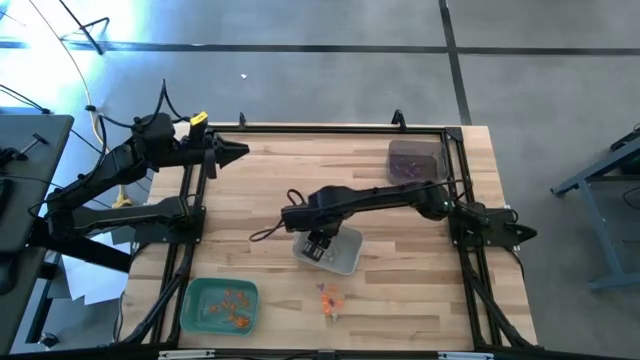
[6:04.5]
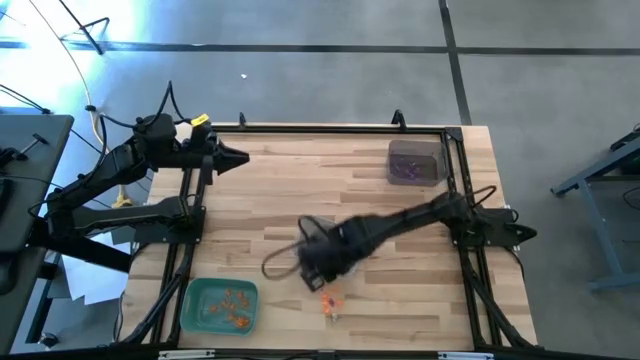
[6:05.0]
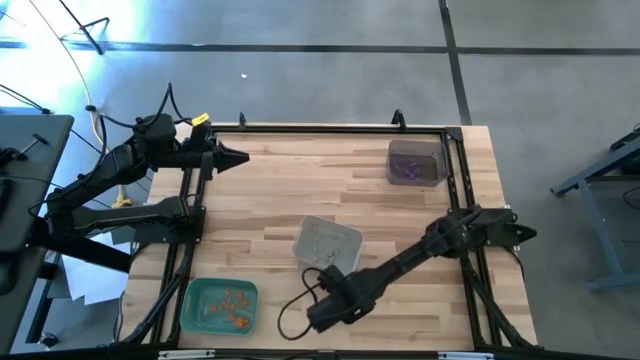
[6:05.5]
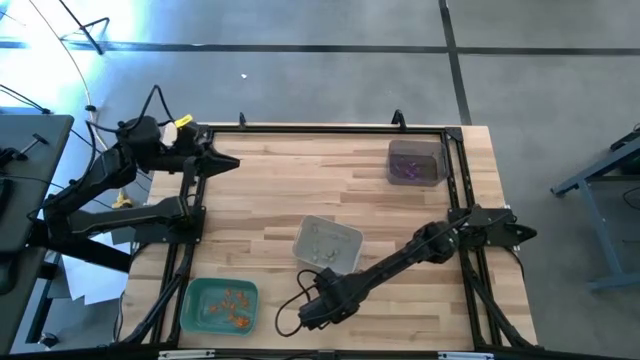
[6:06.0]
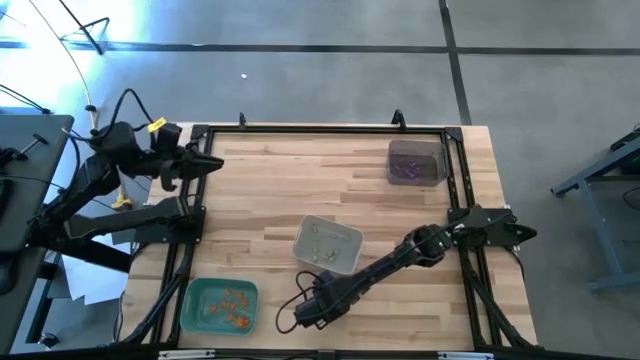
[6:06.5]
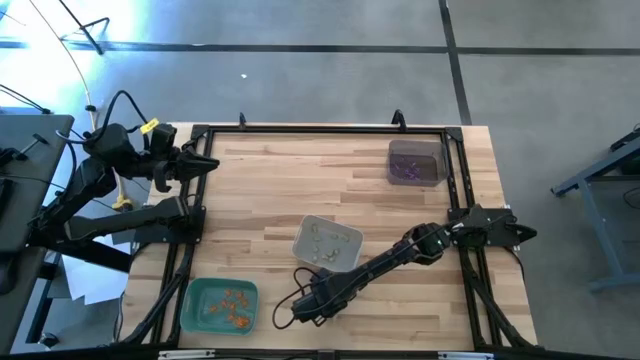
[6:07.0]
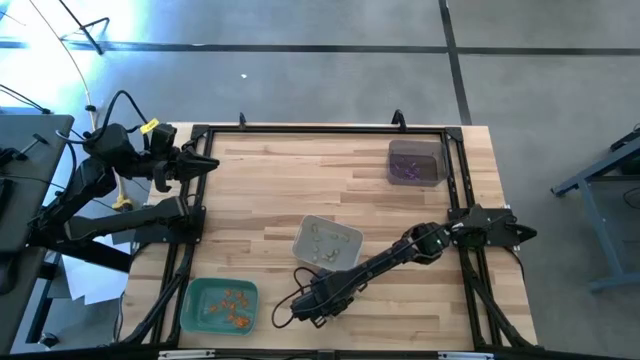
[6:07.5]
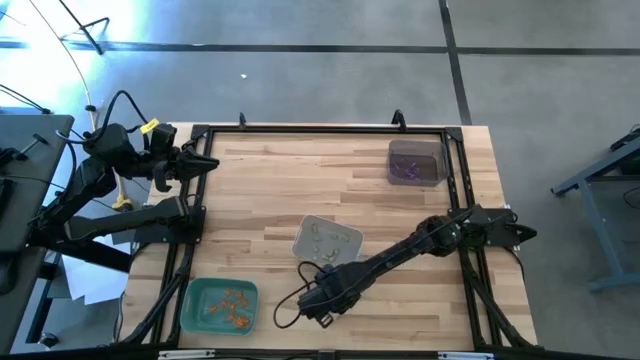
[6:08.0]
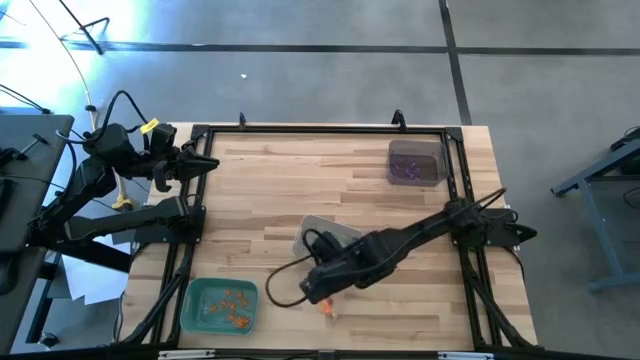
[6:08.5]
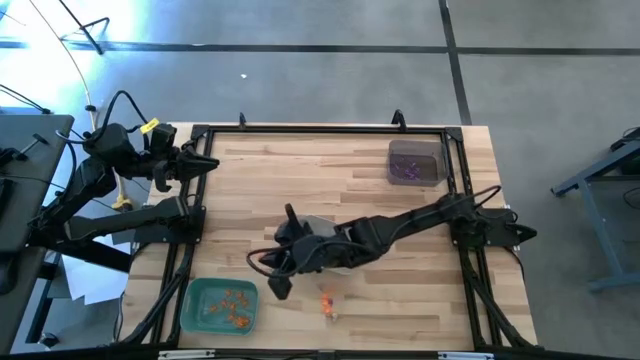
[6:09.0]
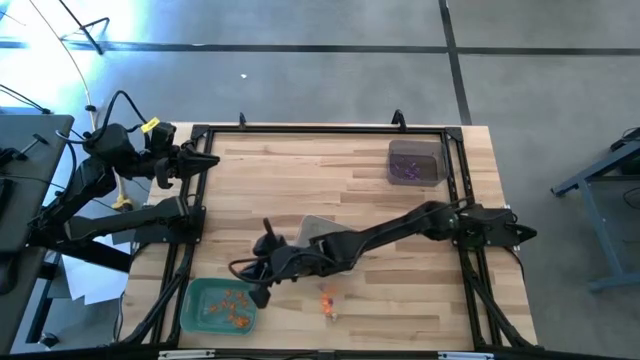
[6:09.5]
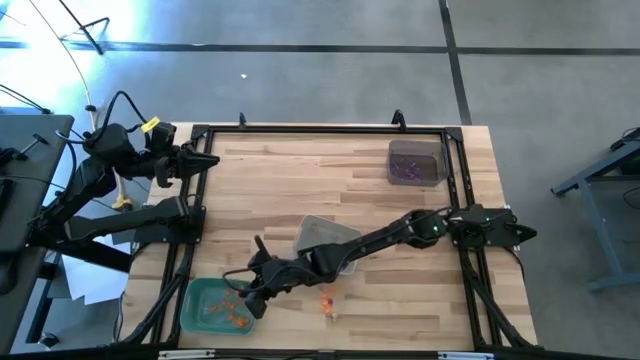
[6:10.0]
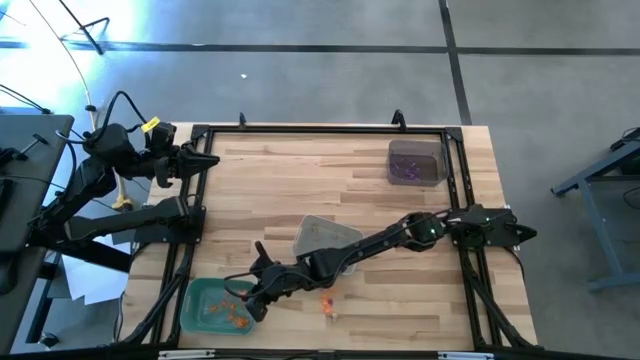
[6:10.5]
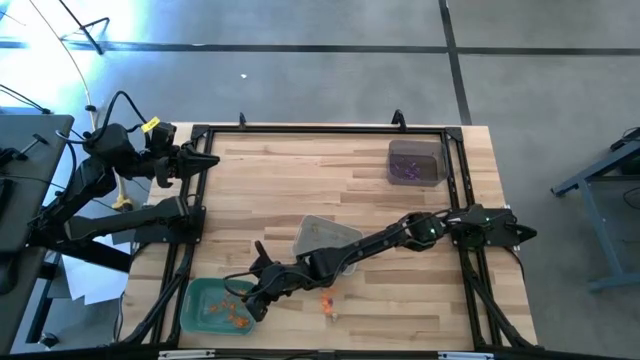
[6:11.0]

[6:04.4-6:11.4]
Task: Sort Halloween decoration
Put the orange spider toy into the green bin

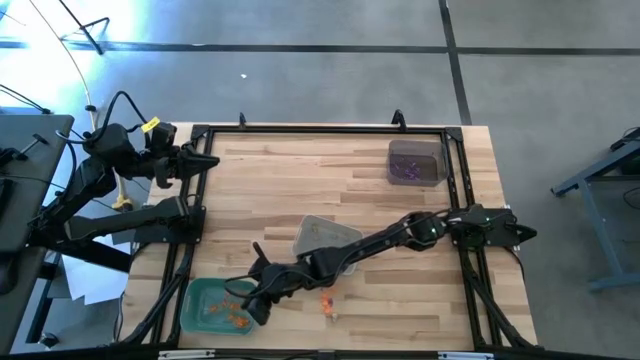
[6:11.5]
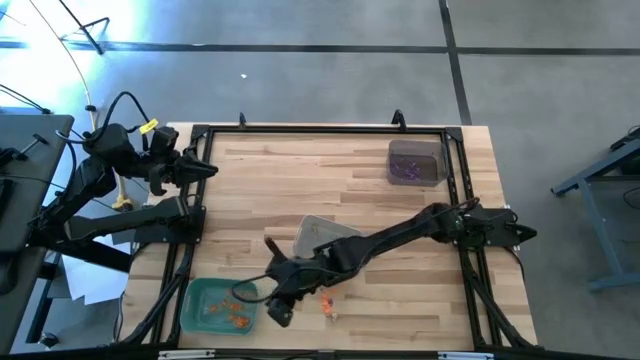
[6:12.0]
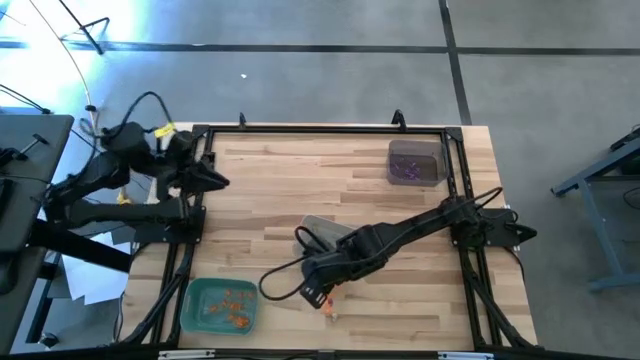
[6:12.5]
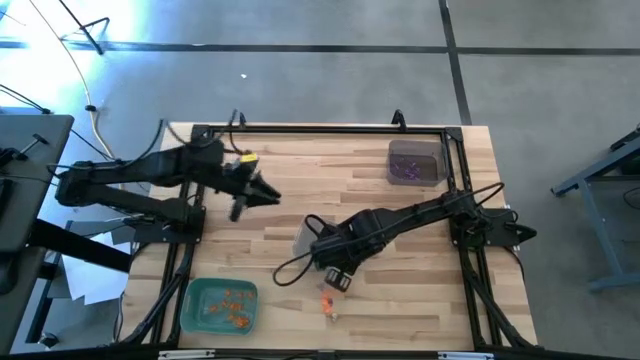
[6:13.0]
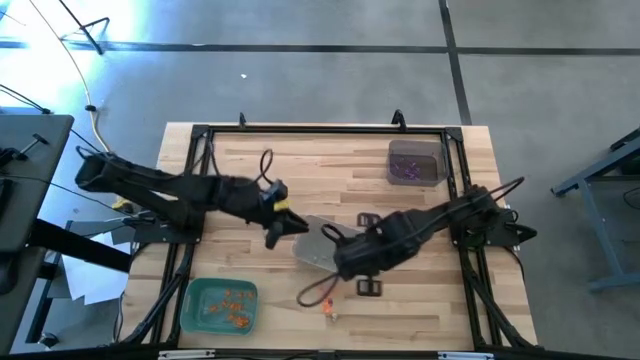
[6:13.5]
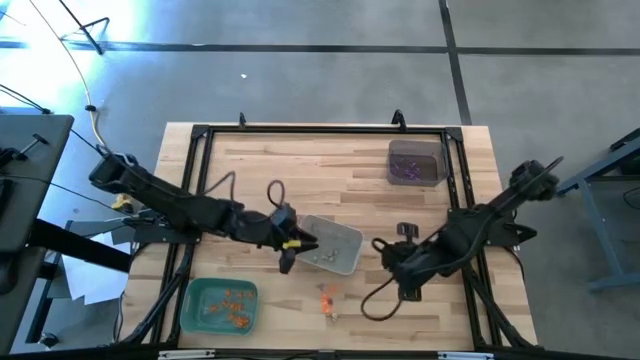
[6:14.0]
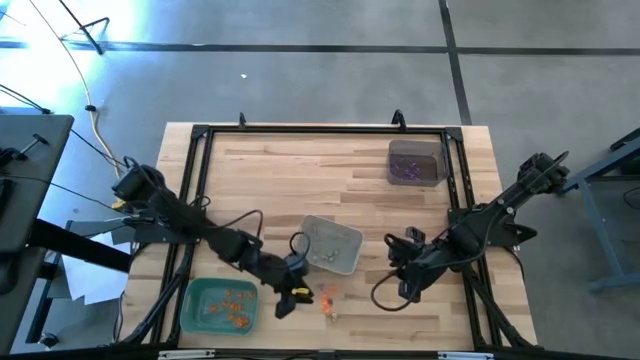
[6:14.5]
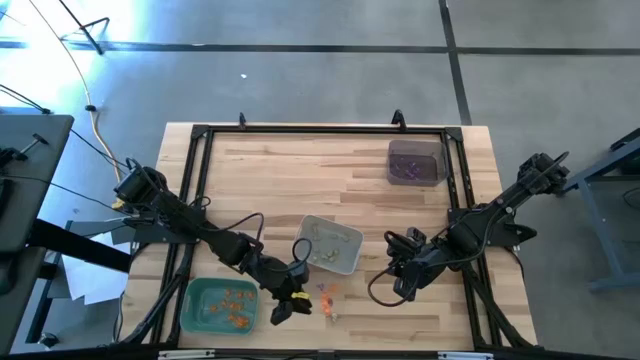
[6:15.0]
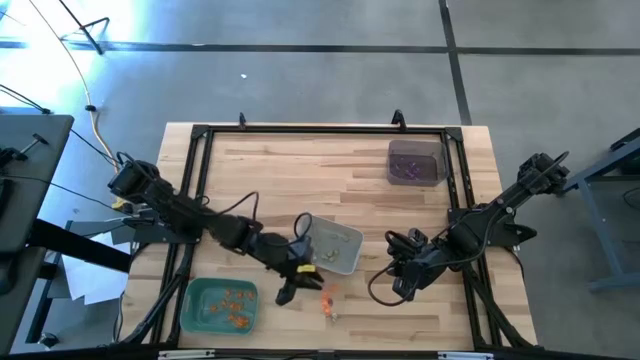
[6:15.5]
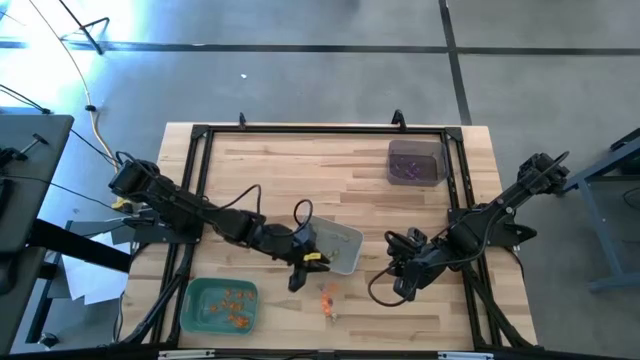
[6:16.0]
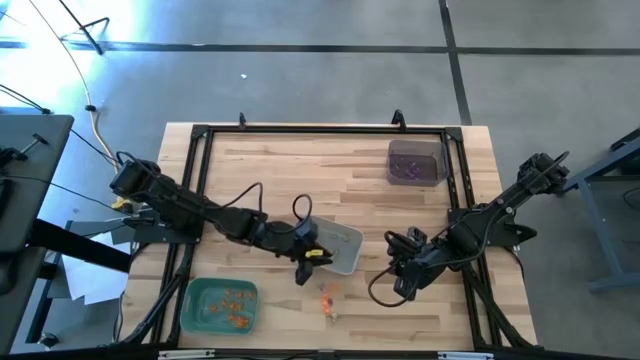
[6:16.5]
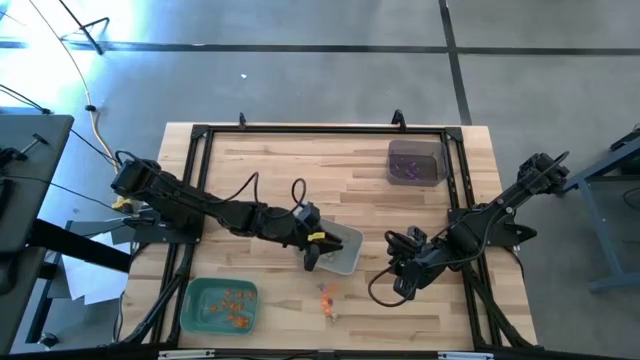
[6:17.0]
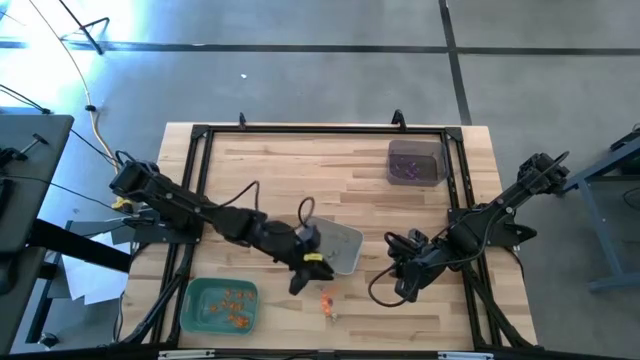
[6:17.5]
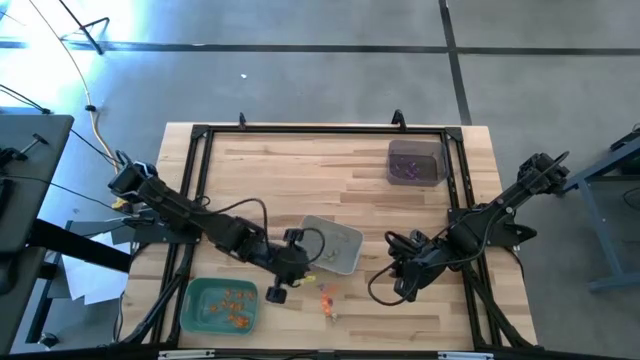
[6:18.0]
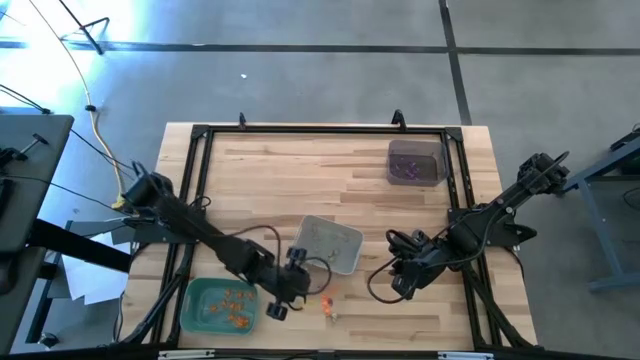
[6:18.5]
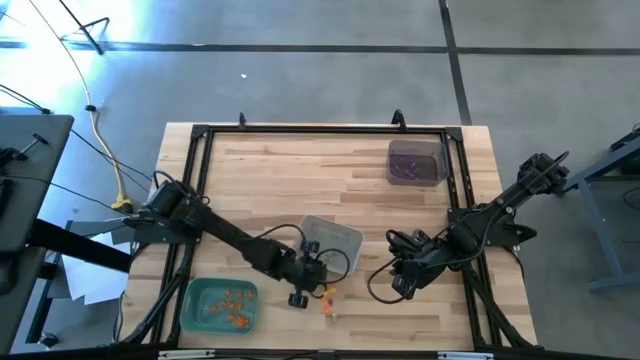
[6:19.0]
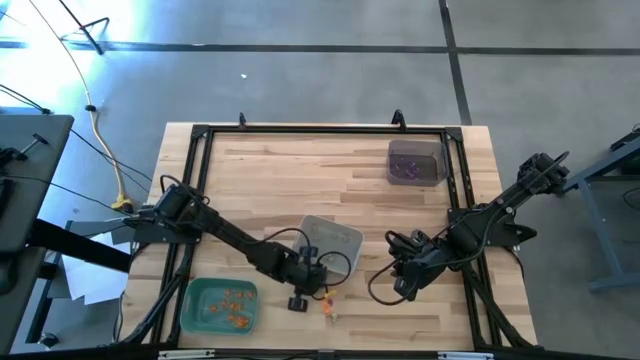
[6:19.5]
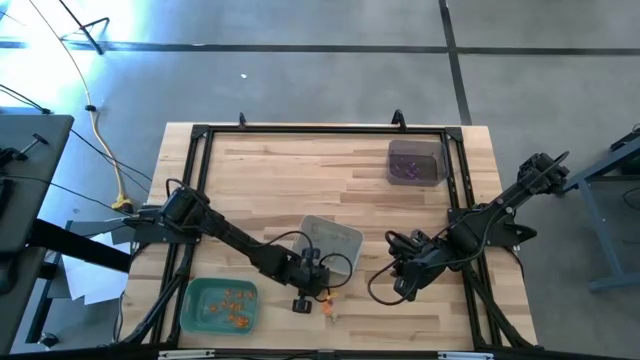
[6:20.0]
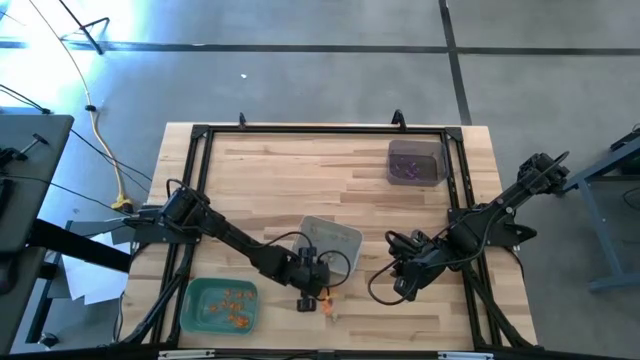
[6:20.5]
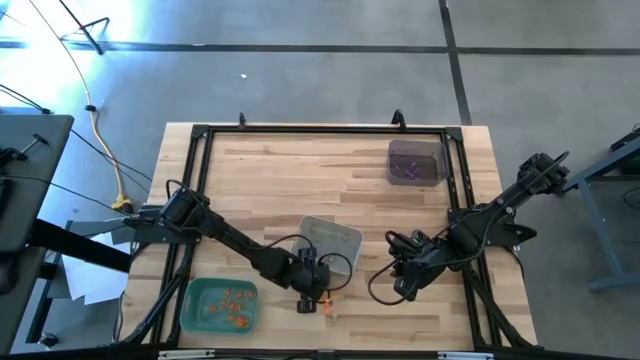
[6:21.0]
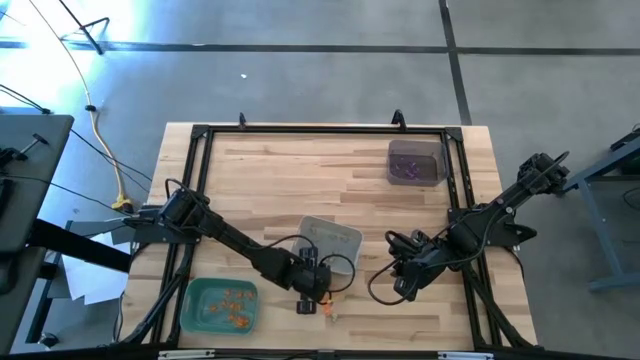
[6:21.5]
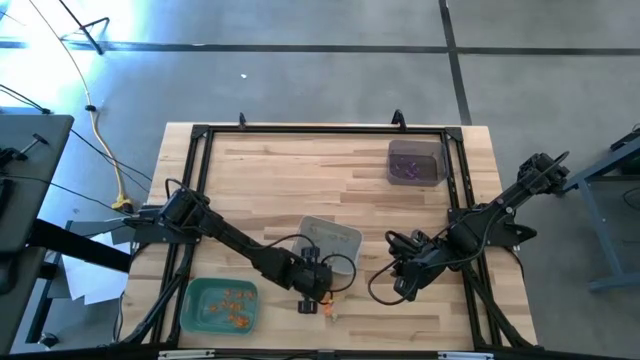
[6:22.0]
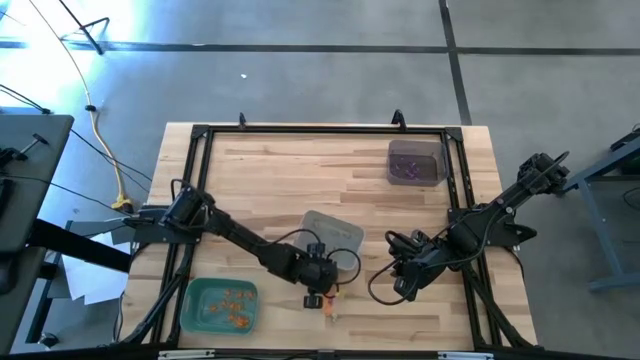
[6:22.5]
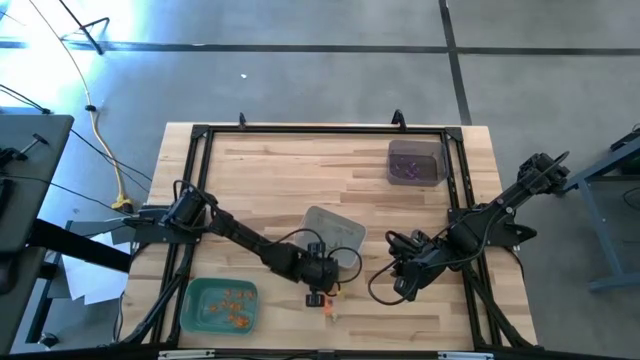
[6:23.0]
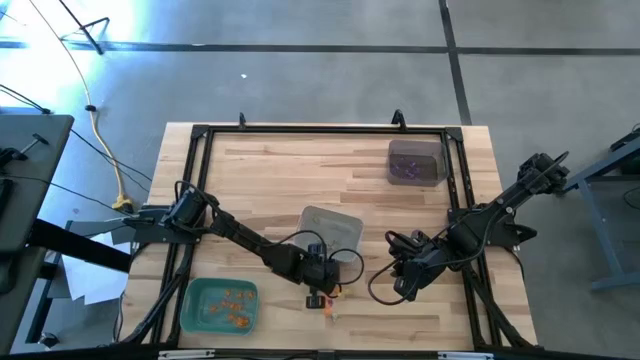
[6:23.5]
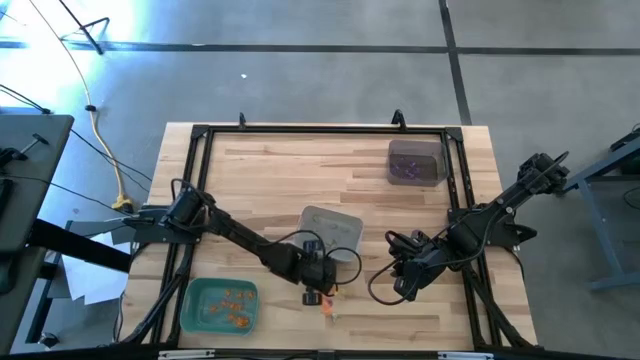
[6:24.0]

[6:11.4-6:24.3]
Put the violet witch hat toy into the black bin

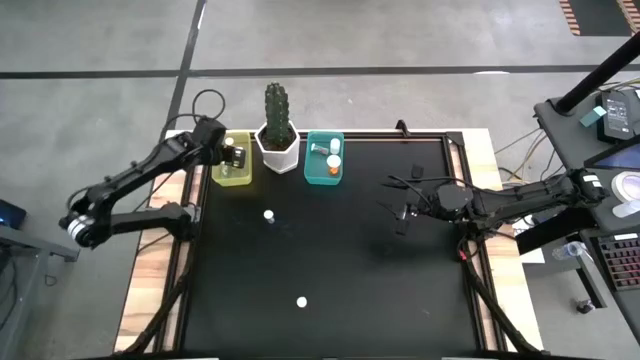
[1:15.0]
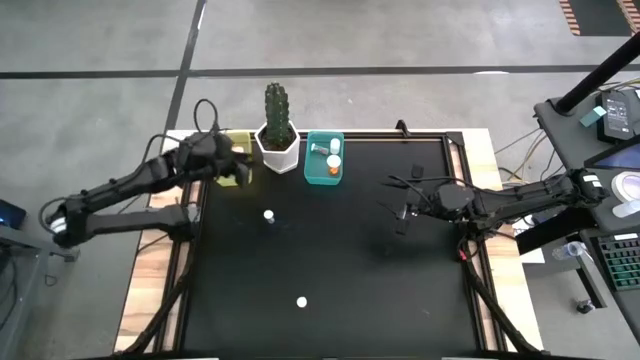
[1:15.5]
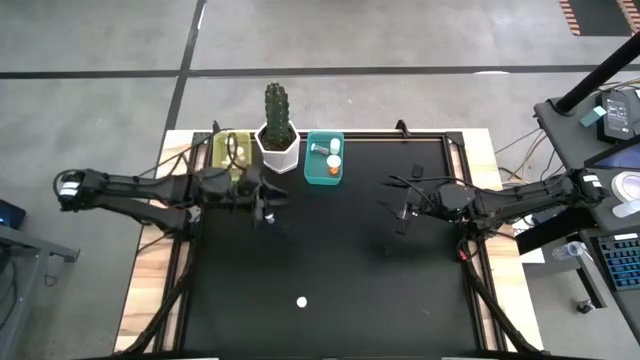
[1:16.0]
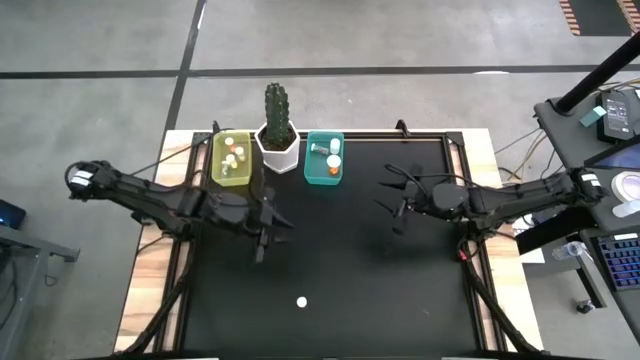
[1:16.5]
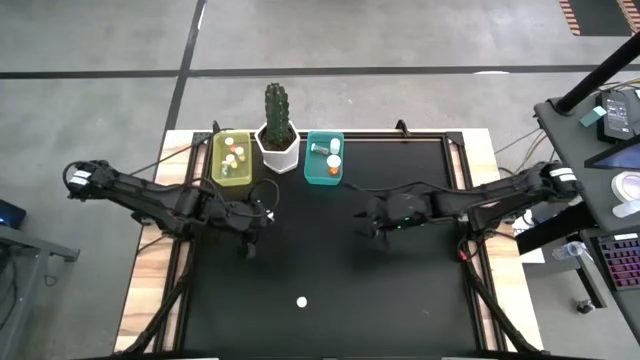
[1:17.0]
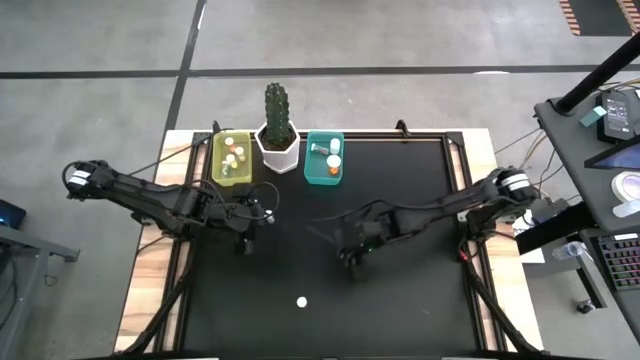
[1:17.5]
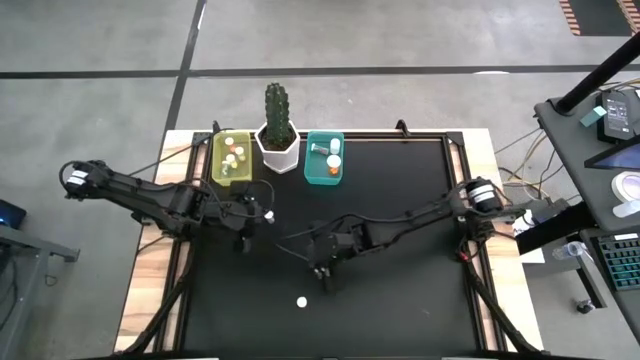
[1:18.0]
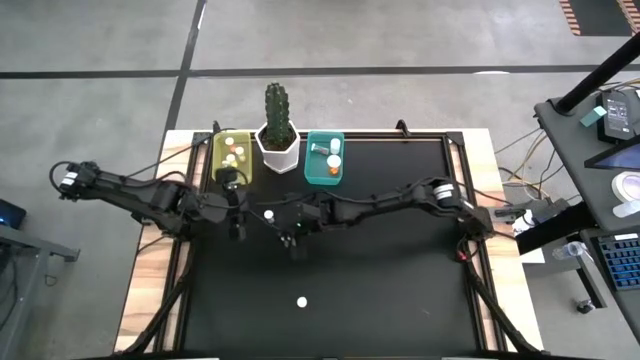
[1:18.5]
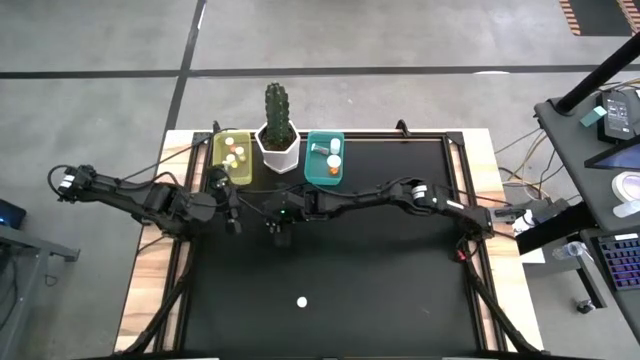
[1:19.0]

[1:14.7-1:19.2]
Task: Pick and place medicine bottles into bin by pill shape (circle, oval)
Put the blue capsule bottle into the blue bin
